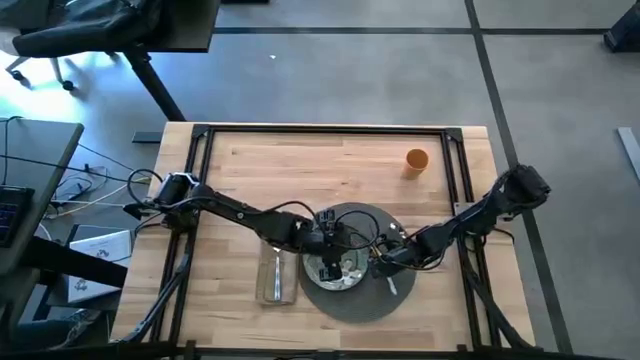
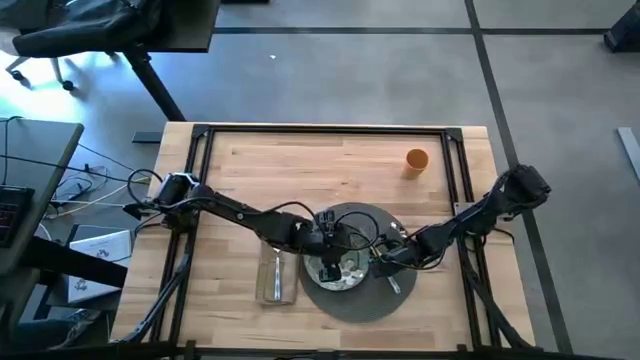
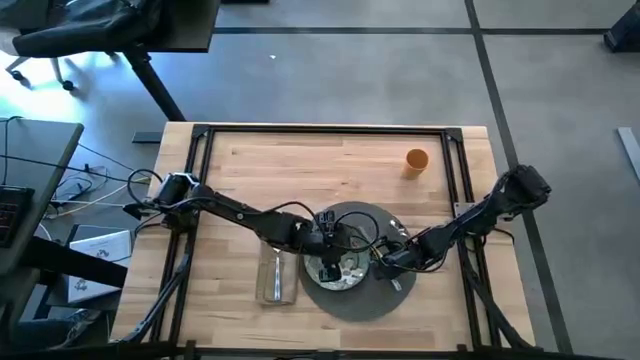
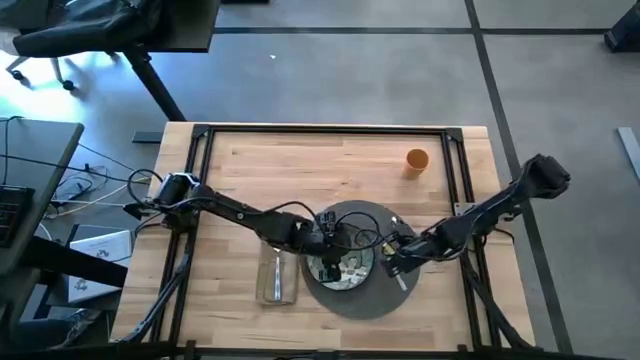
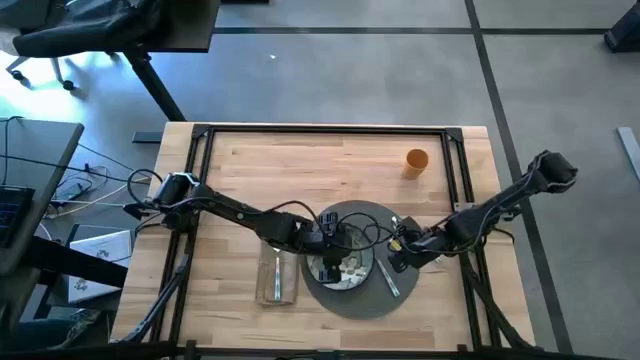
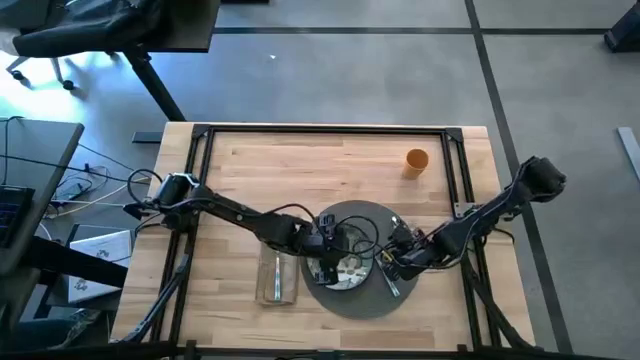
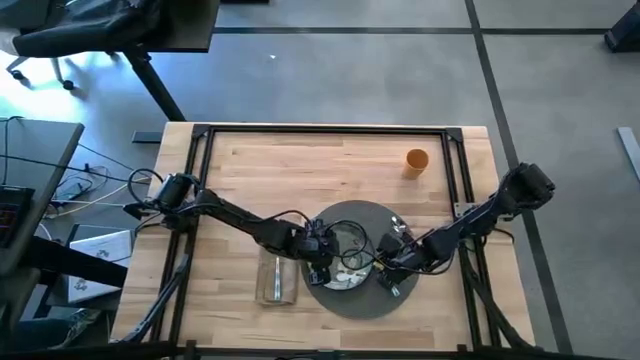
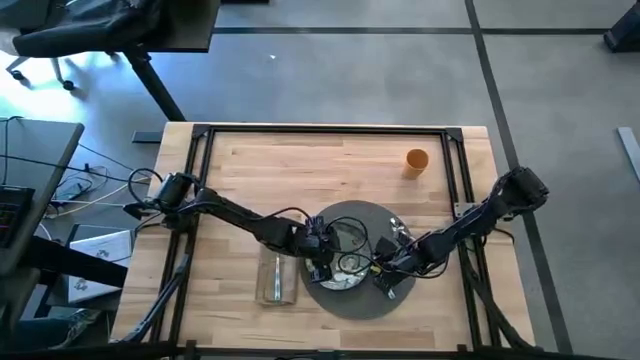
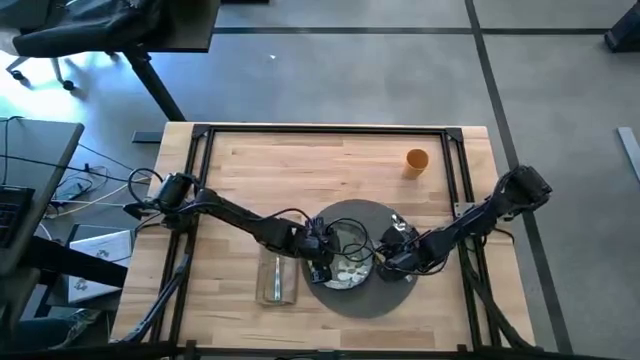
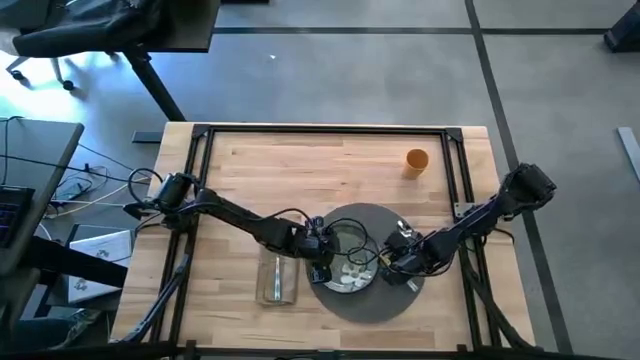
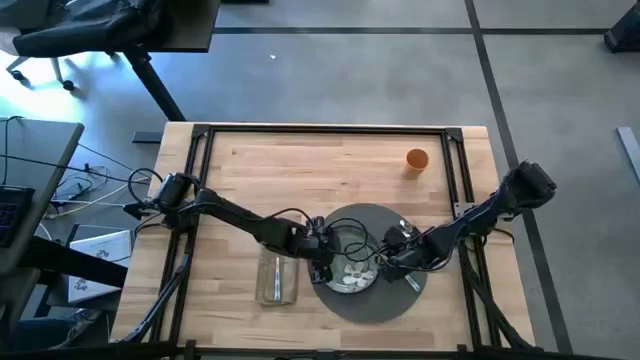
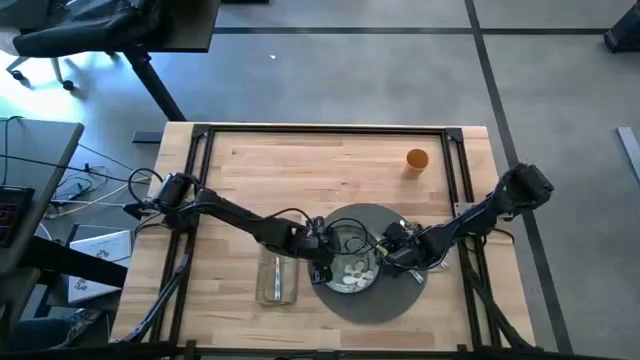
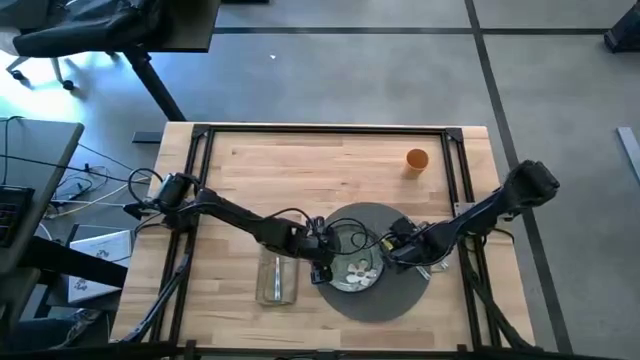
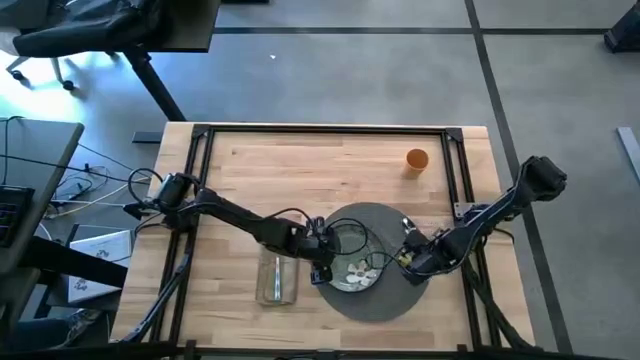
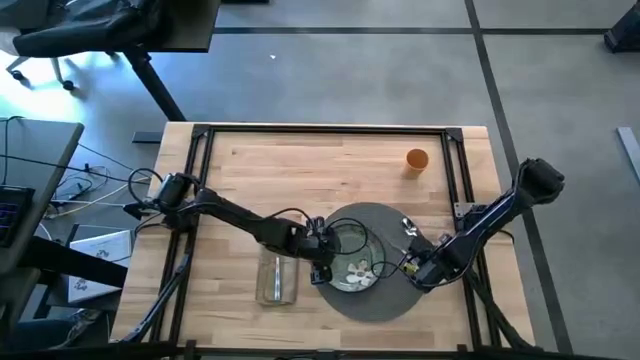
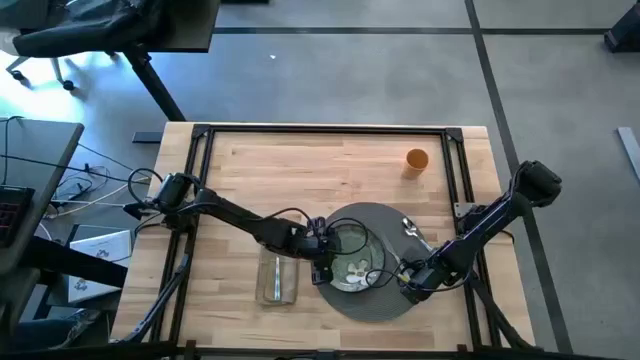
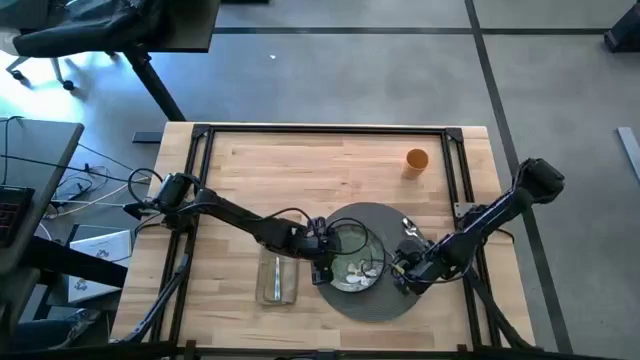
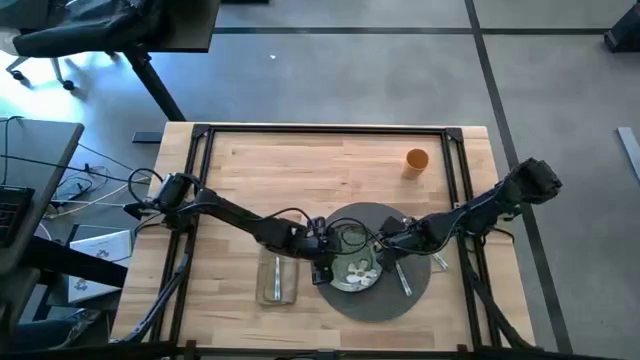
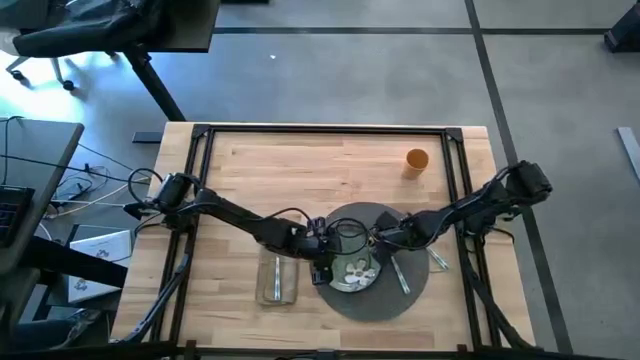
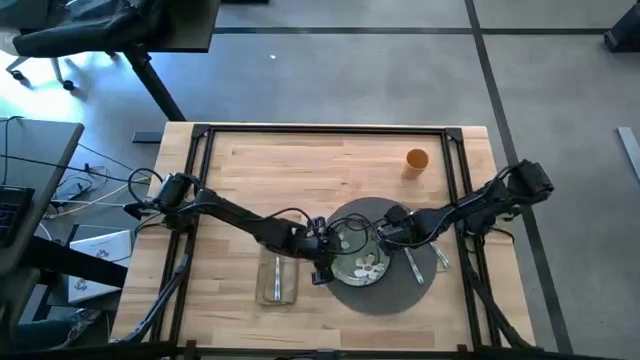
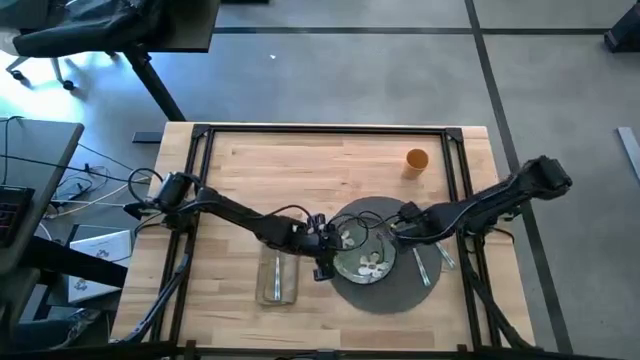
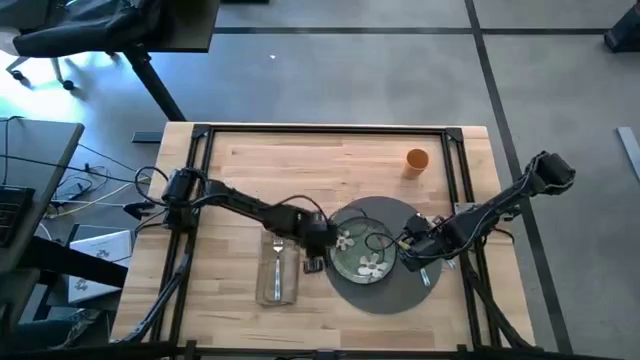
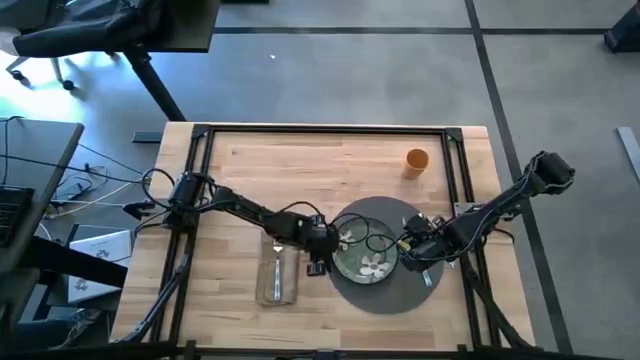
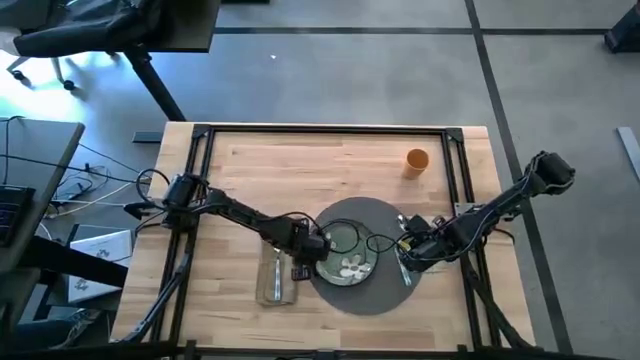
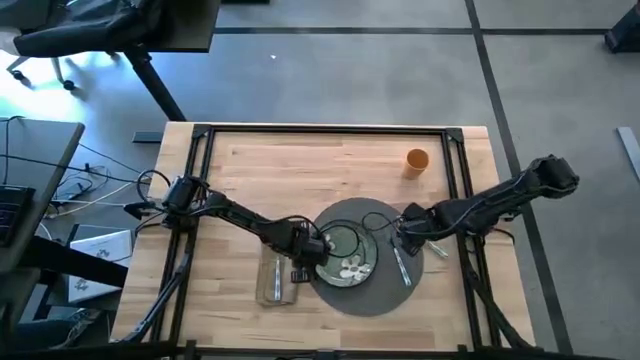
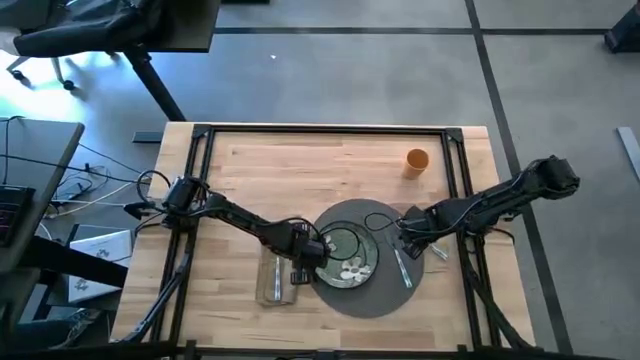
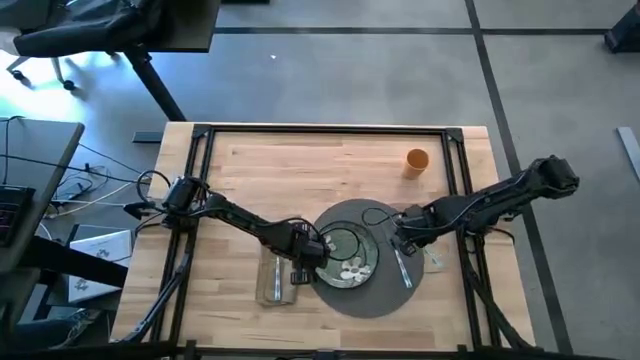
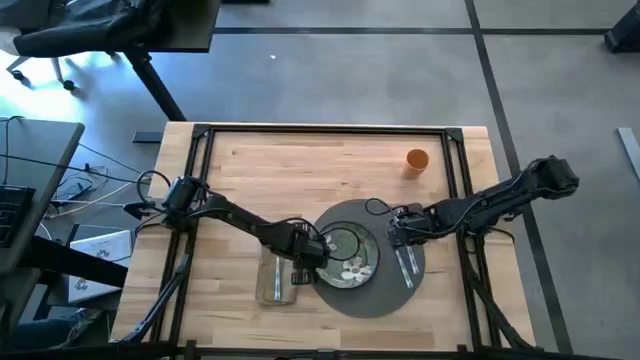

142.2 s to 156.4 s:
Task: Set table place
Adjust the silverware on the gray placemat

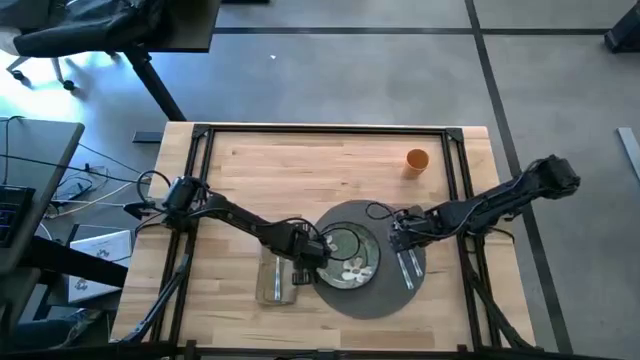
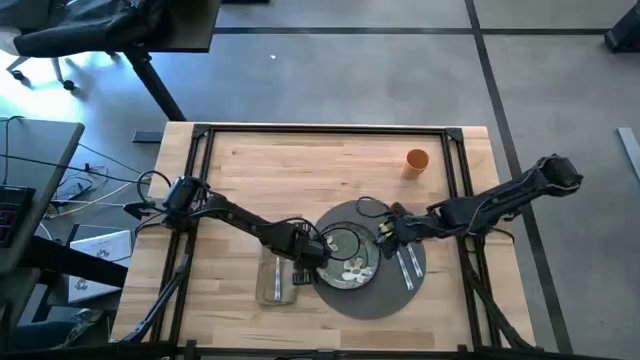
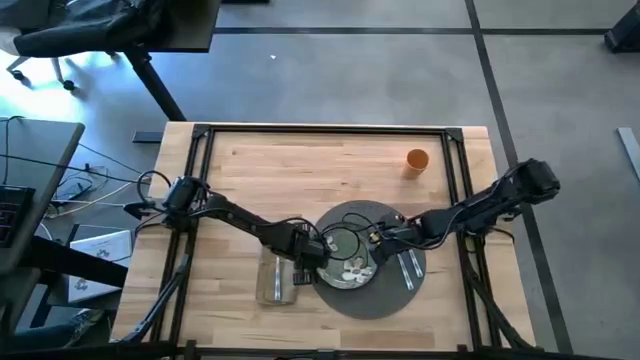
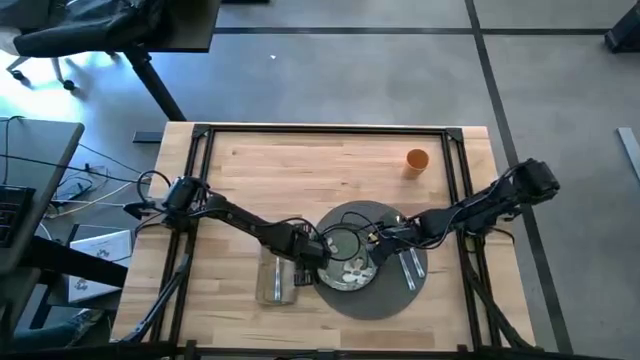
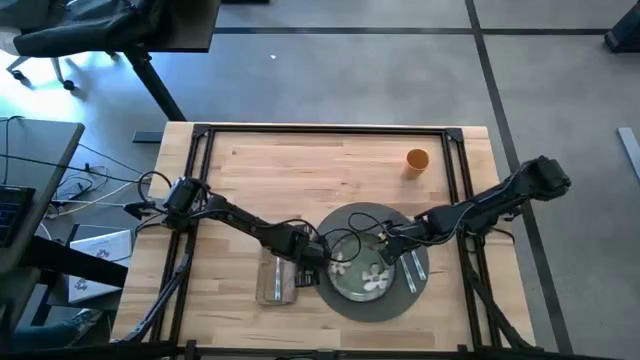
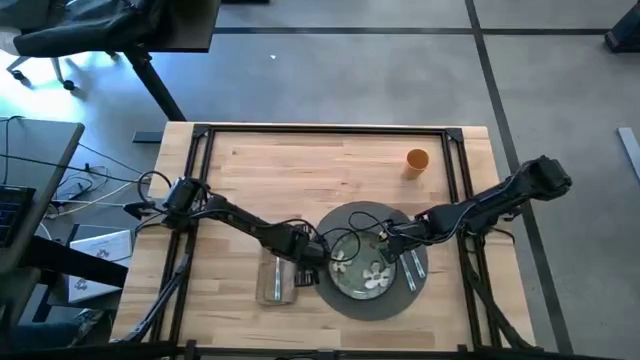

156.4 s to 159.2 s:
Adjust the green plate on the placemat

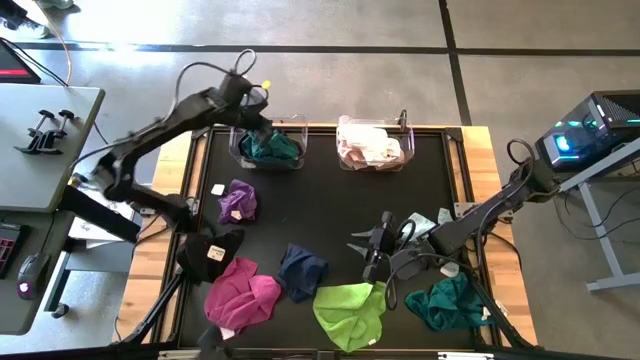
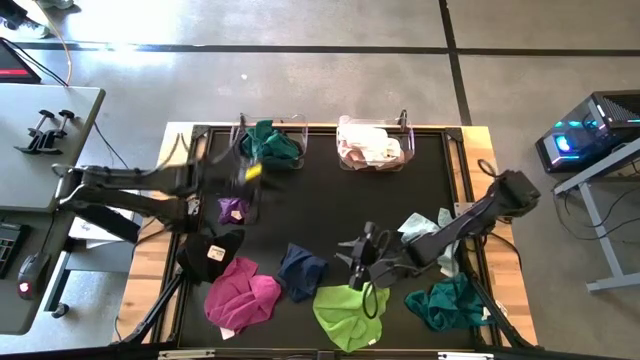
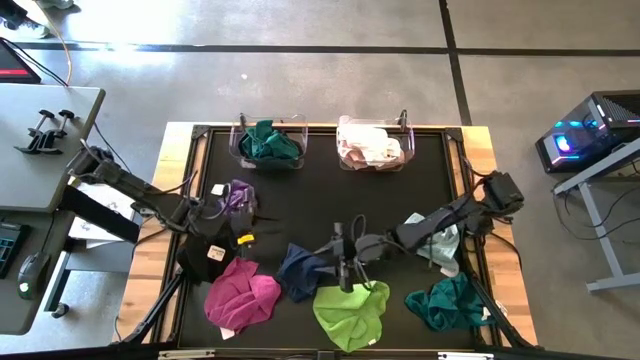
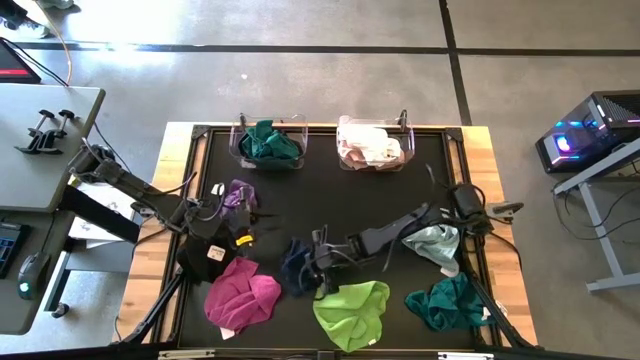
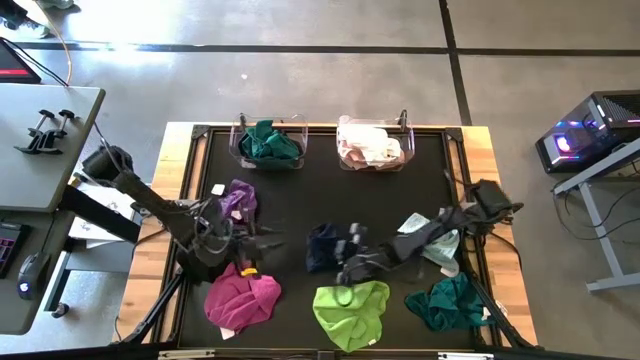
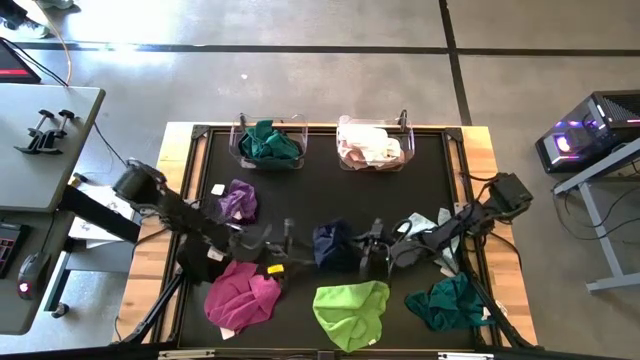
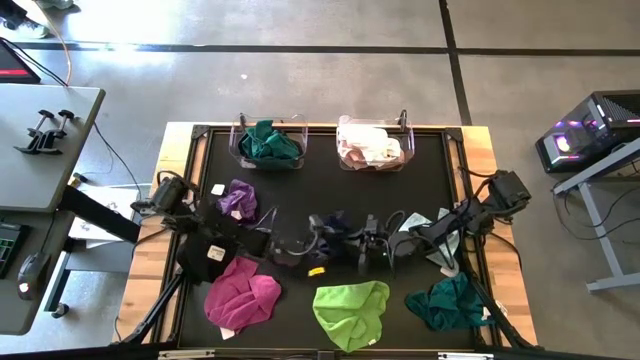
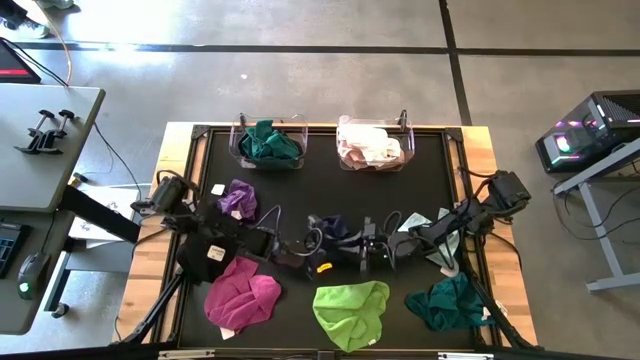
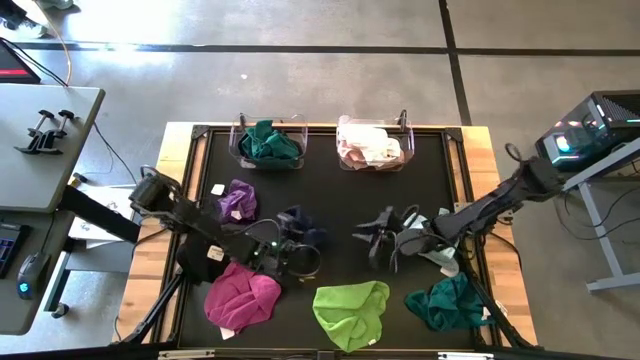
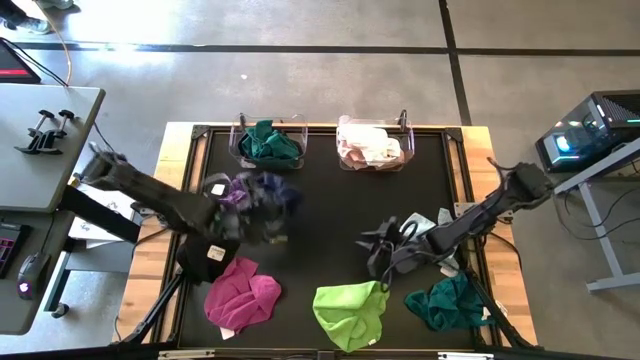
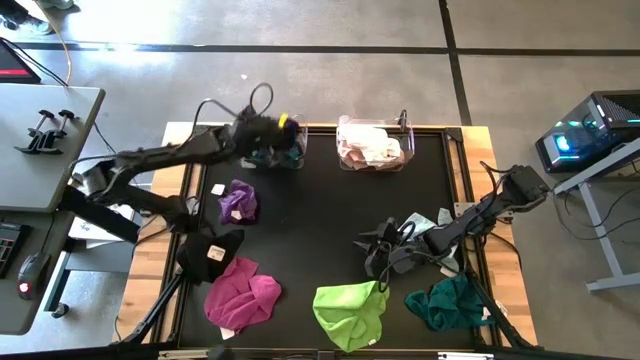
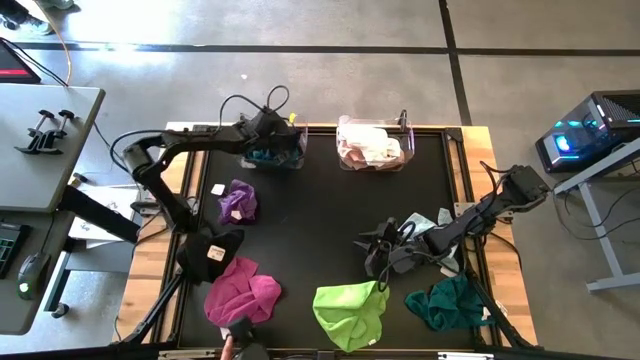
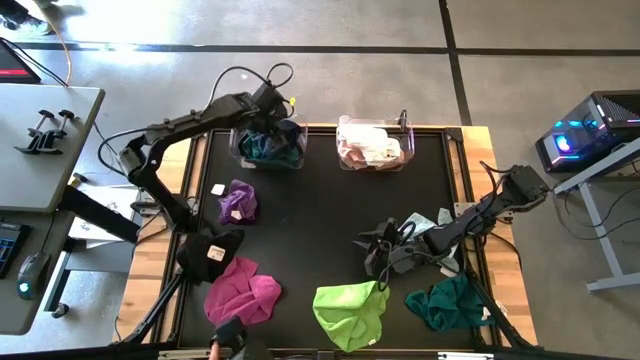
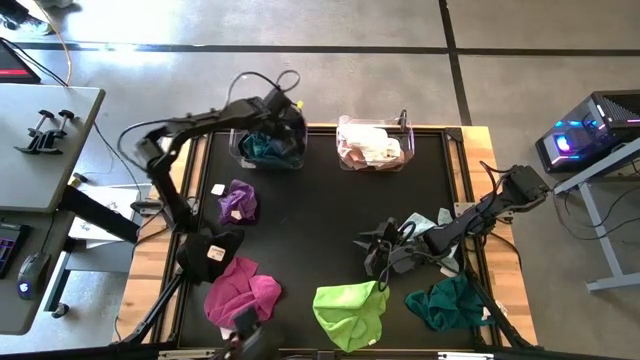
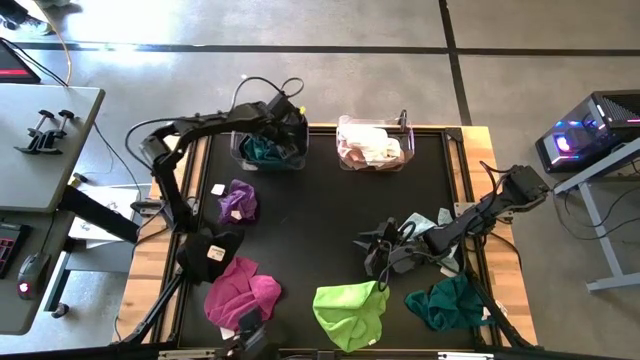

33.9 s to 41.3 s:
Task: Sort towels by color in basket
Put the dark blue microfiber towel into the left transparent bin
